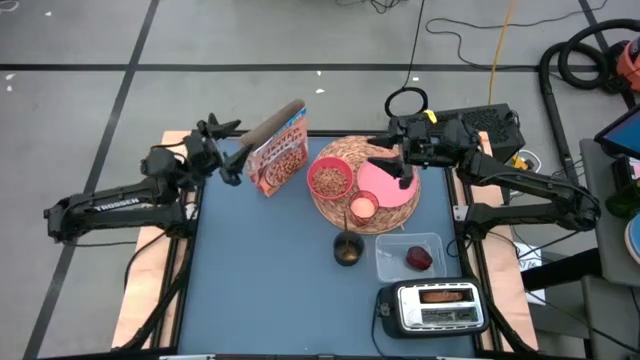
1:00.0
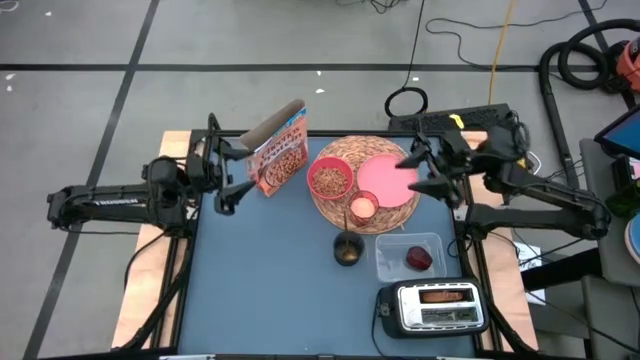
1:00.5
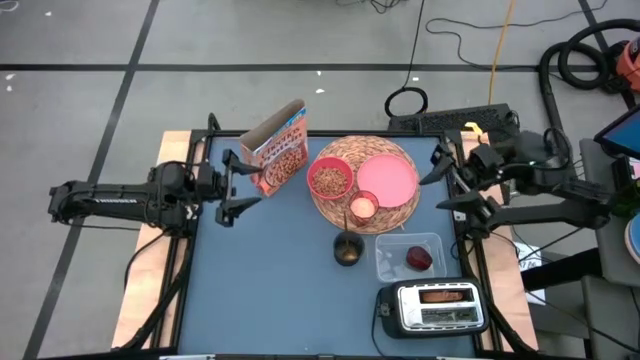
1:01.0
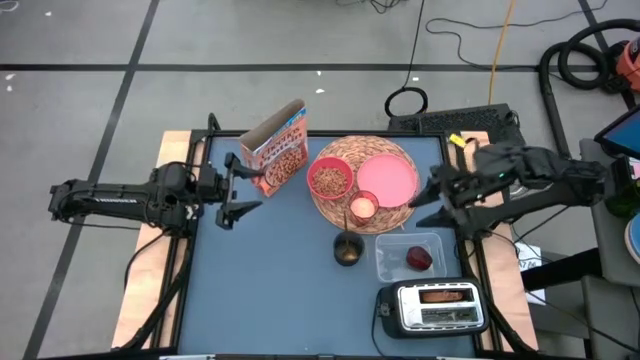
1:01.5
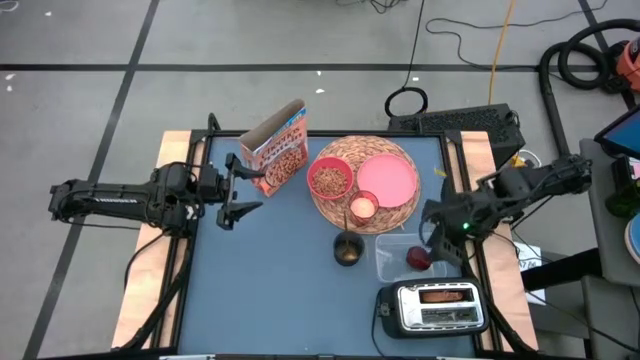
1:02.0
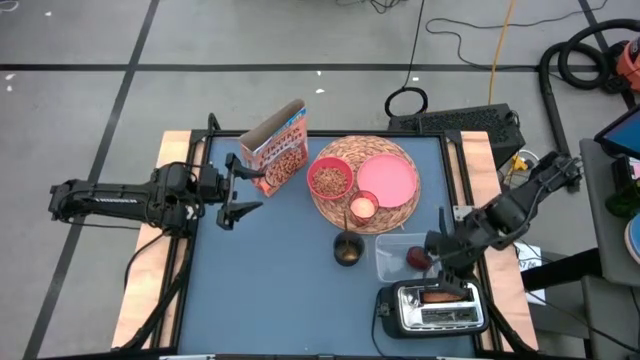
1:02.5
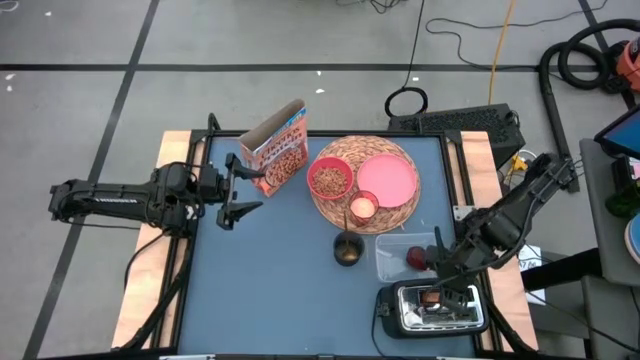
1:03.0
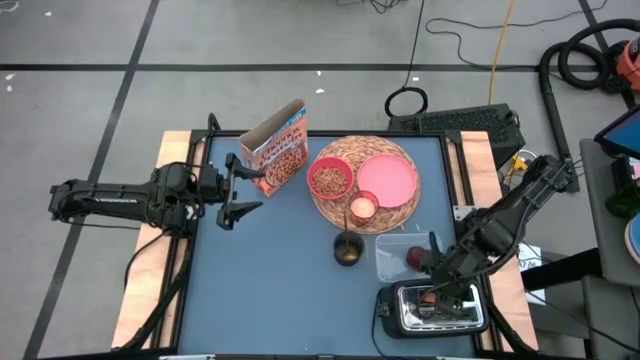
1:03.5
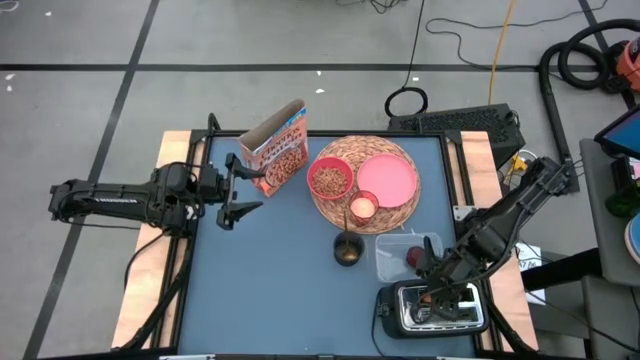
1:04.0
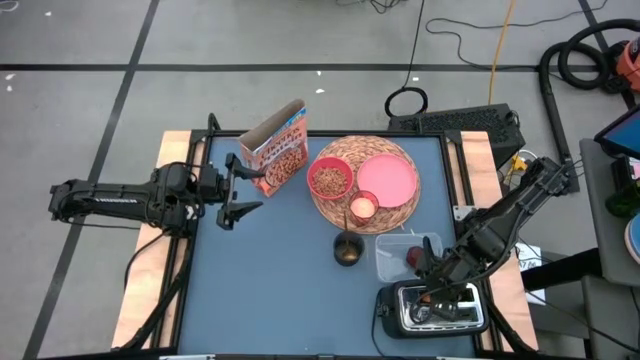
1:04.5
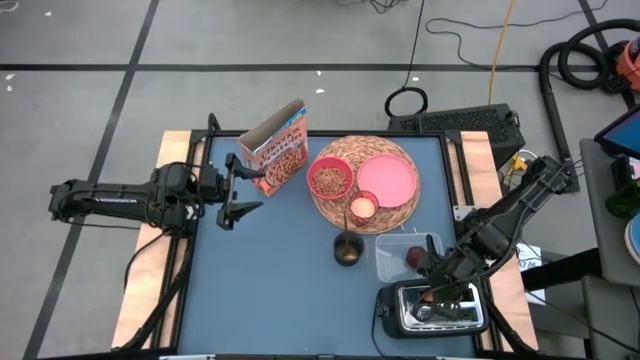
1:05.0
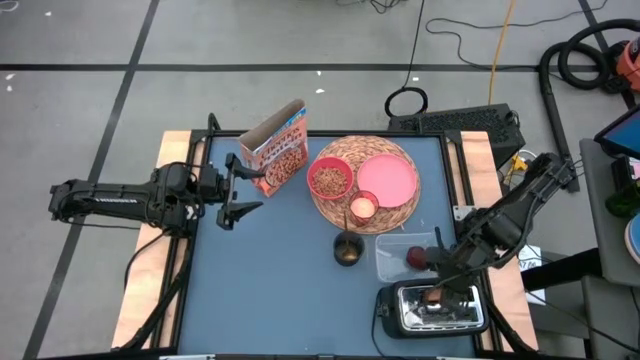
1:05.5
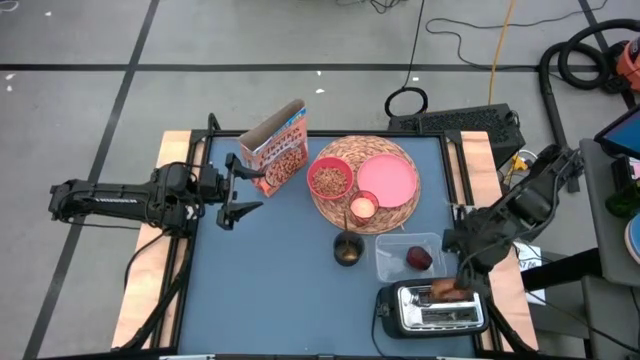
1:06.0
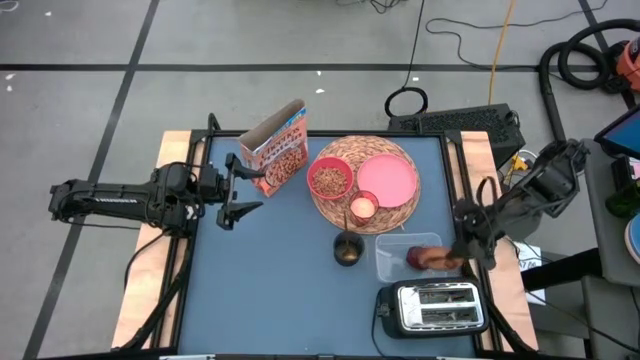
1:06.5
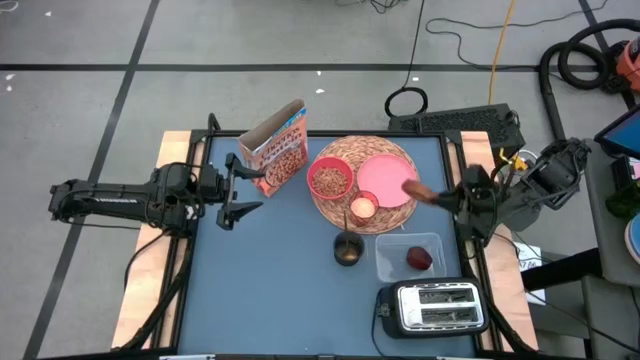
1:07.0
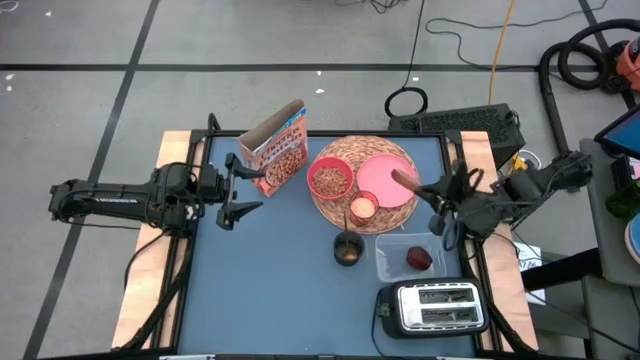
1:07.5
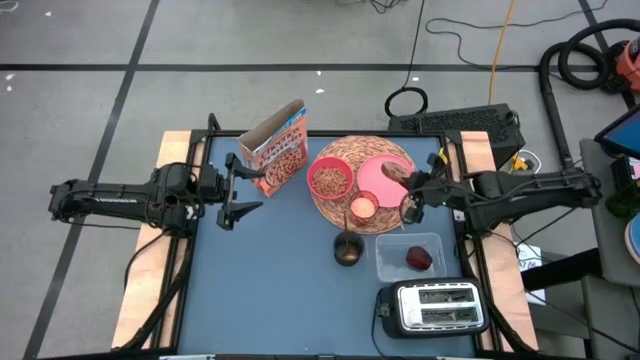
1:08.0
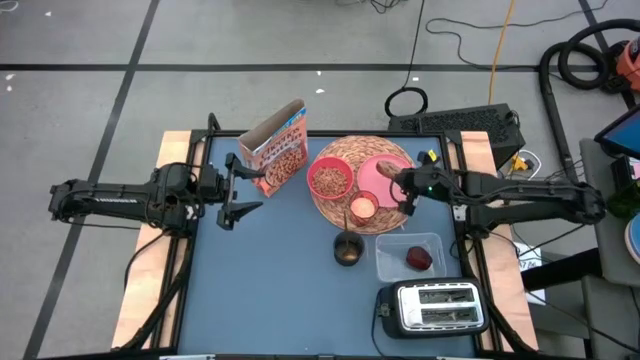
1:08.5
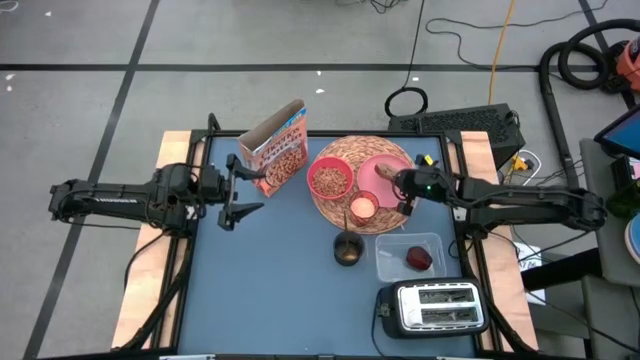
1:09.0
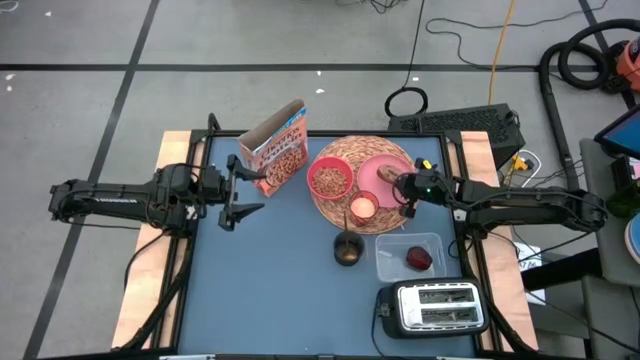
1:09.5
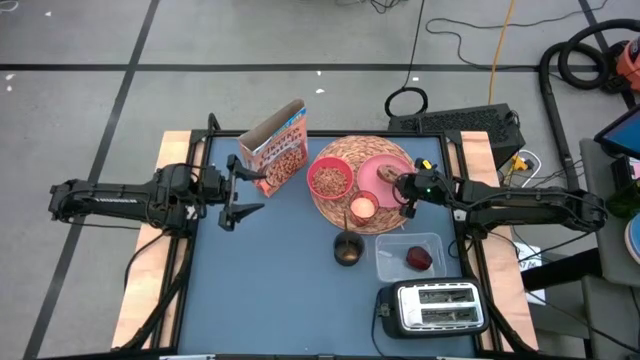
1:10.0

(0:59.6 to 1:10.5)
Task: Arrange a breakfast setting
Put the toasted bread on the pink plate

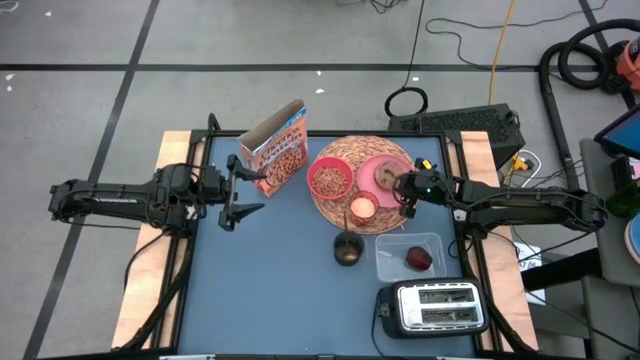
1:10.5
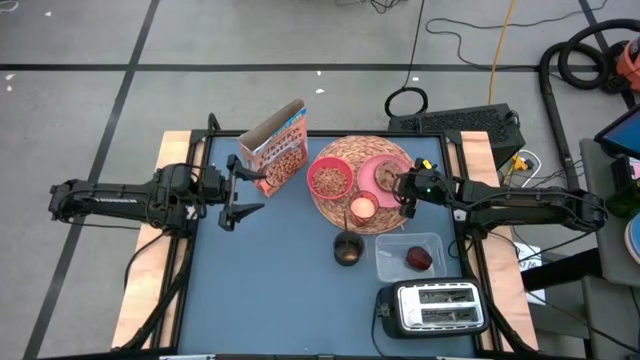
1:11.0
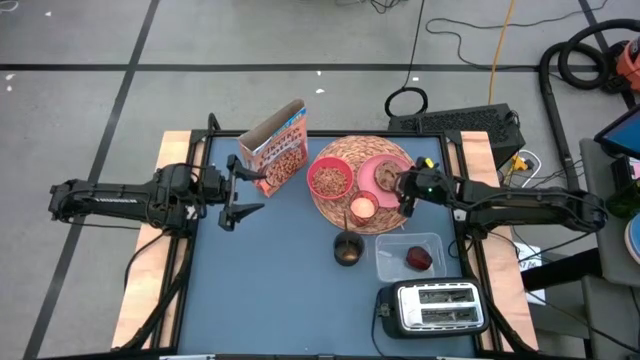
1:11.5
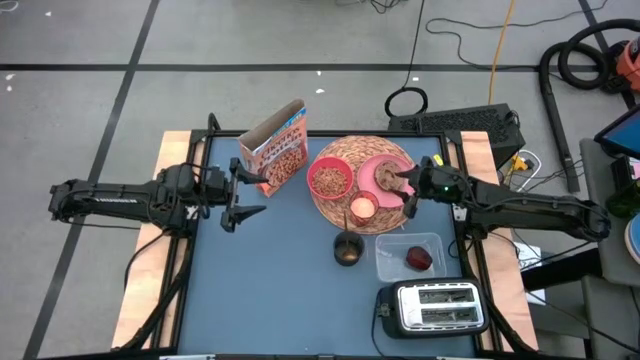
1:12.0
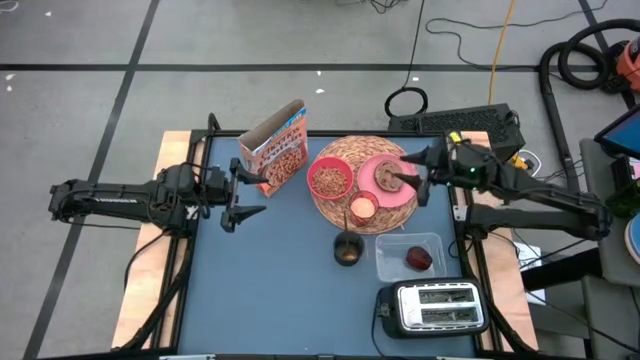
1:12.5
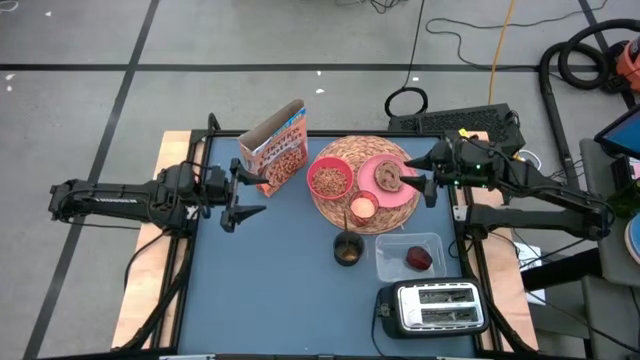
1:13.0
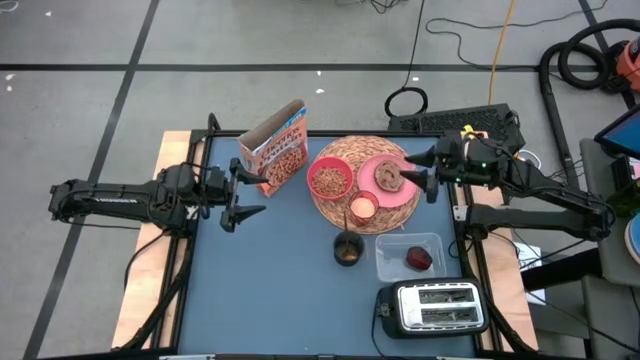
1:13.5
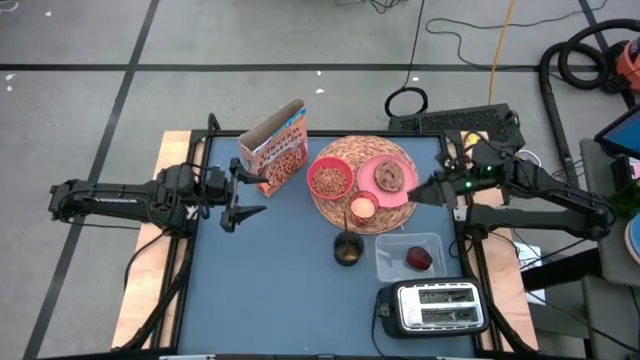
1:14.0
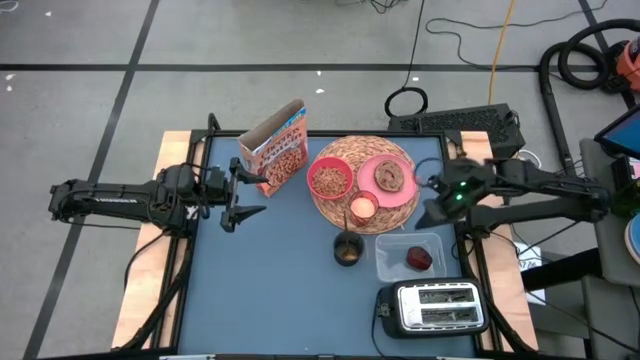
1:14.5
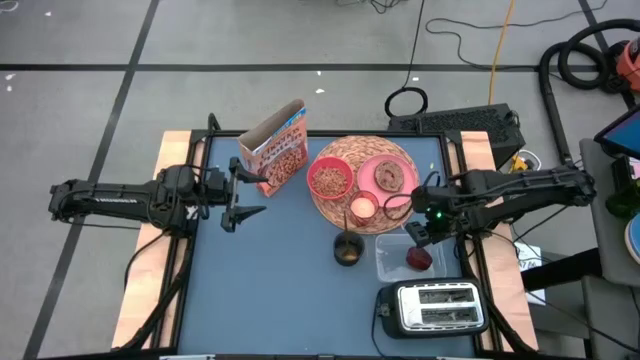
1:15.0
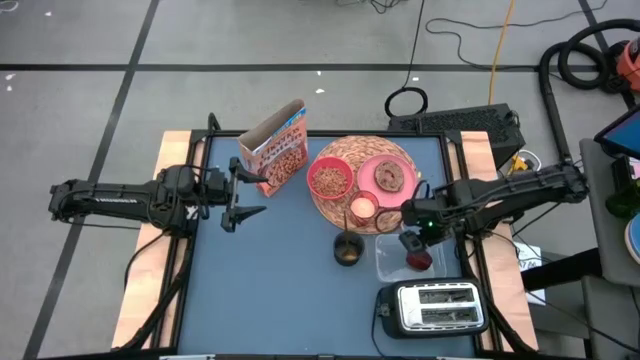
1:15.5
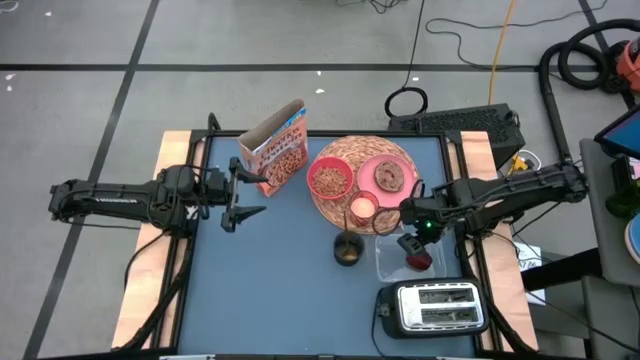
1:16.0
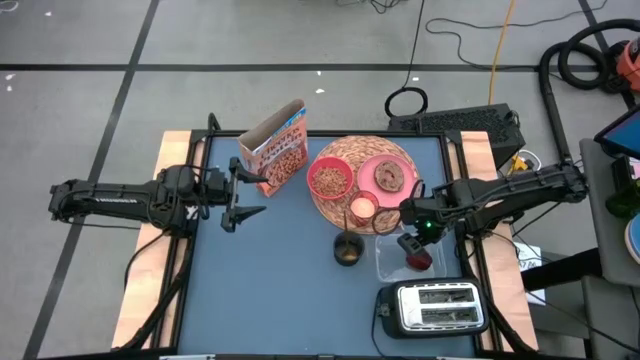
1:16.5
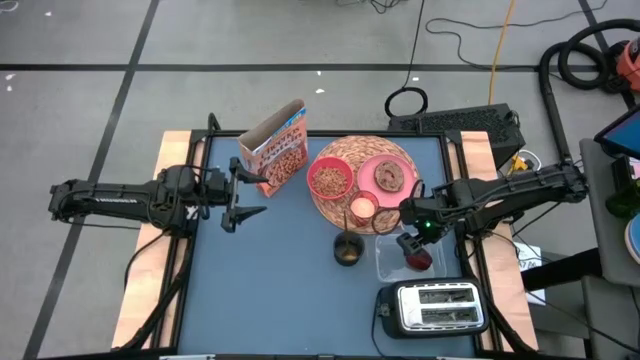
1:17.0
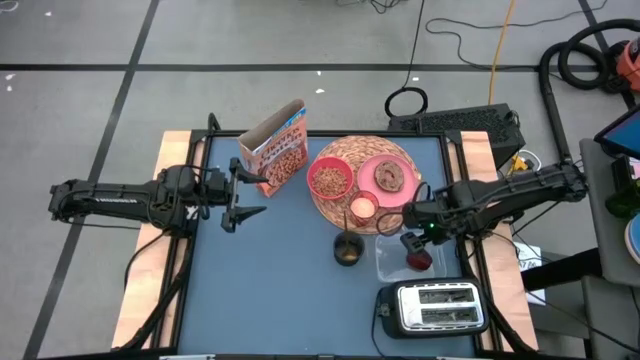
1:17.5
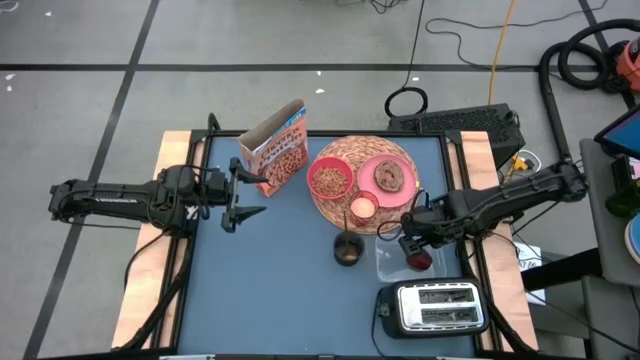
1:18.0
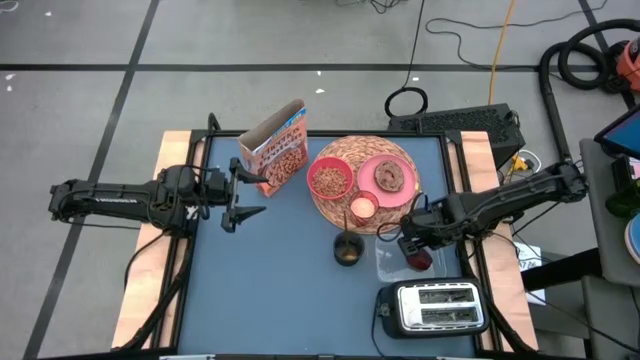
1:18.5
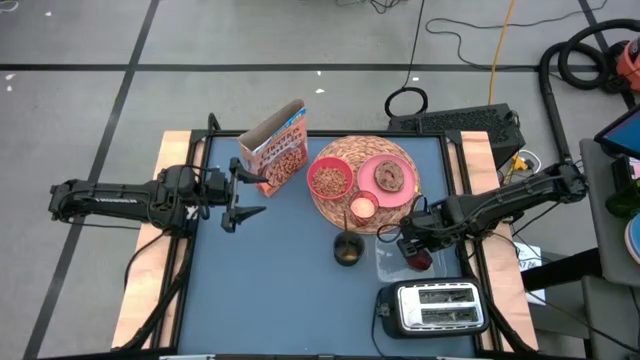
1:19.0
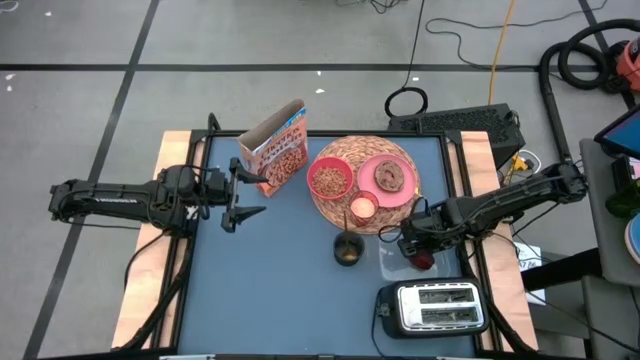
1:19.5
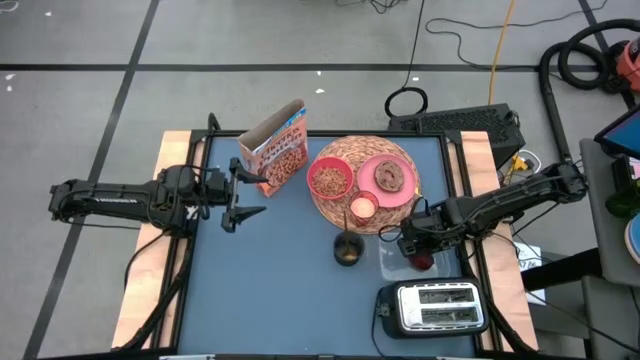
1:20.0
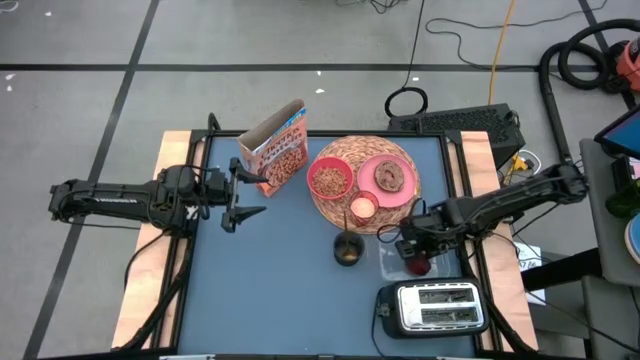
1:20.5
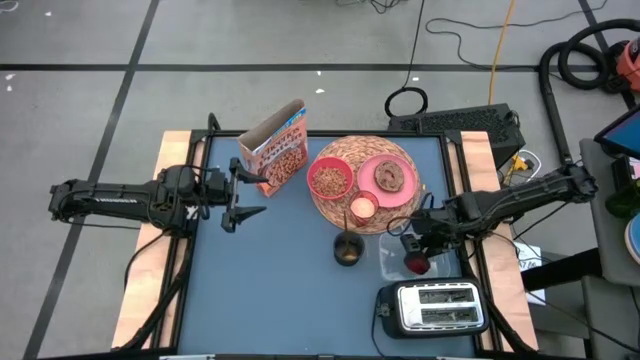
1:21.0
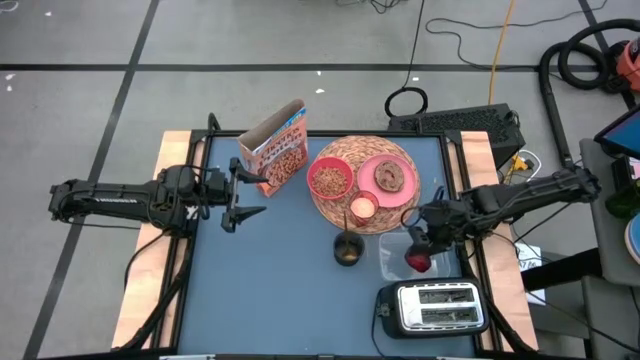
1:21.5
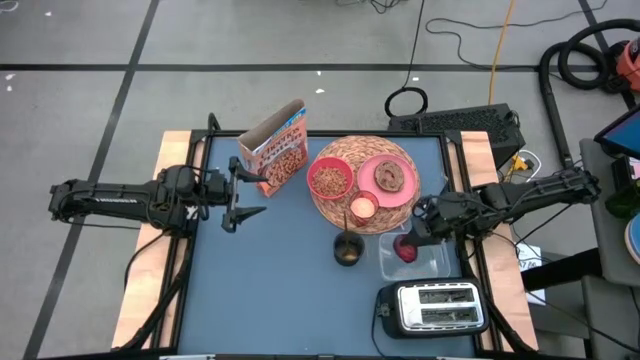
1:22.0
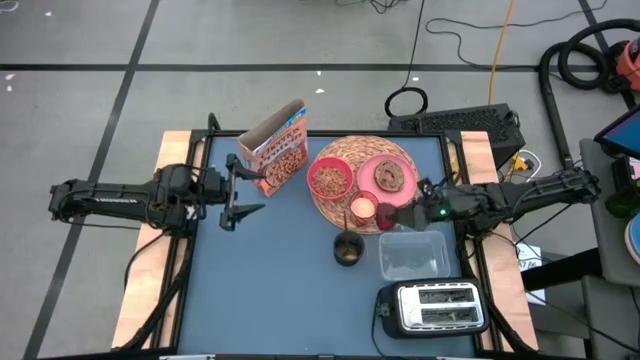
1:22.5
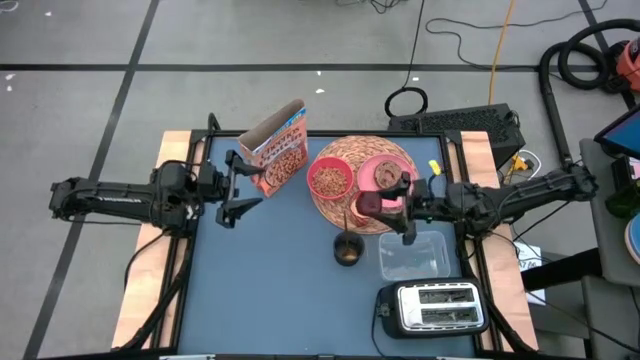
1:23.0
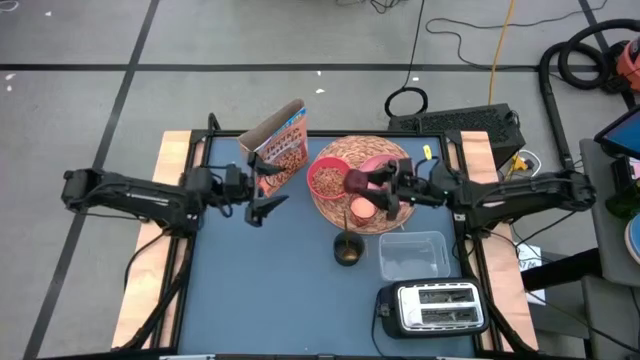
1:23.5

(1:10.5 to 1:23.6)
Put the red apple on the top center of the brown woven mat
